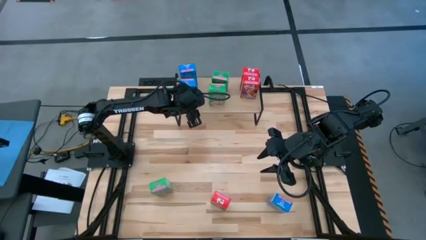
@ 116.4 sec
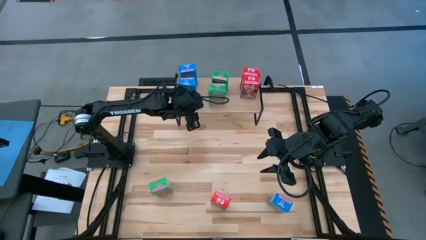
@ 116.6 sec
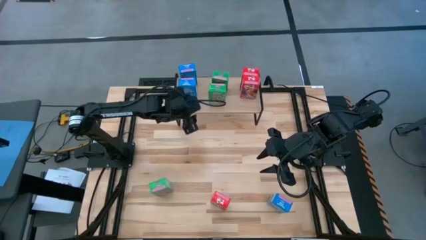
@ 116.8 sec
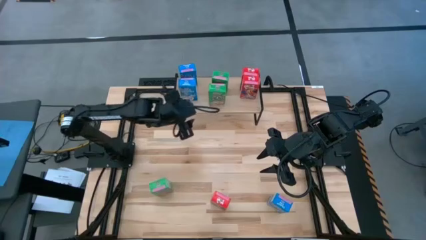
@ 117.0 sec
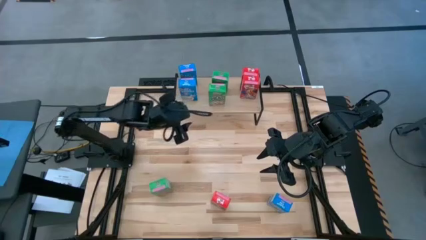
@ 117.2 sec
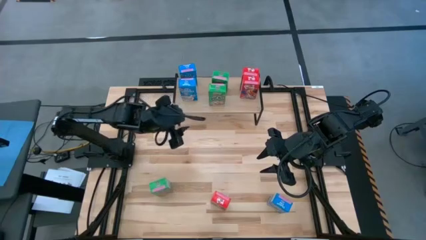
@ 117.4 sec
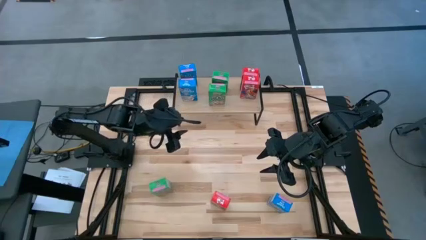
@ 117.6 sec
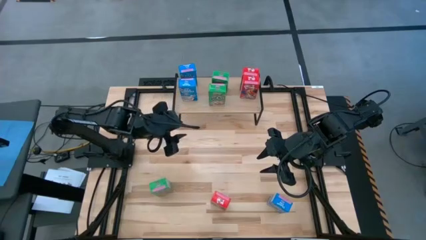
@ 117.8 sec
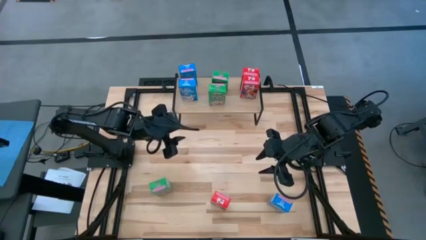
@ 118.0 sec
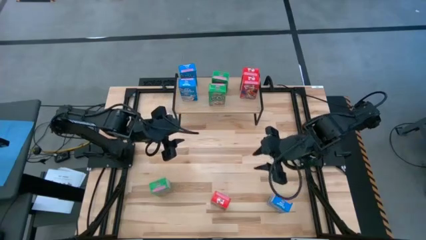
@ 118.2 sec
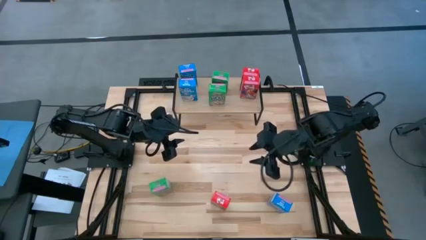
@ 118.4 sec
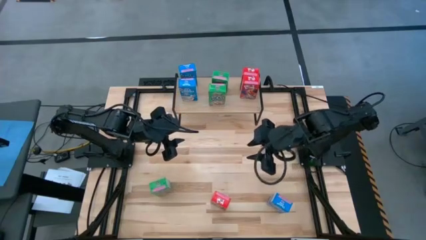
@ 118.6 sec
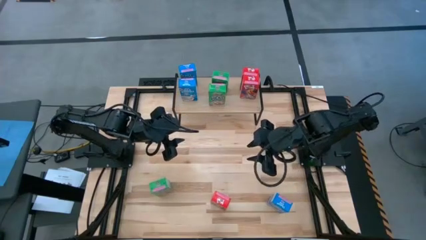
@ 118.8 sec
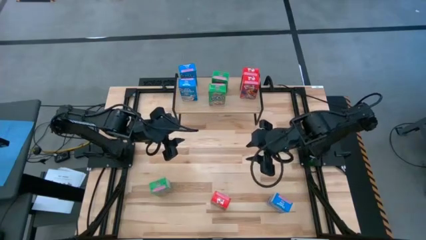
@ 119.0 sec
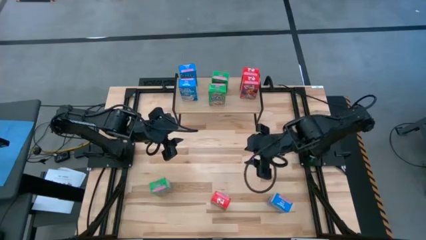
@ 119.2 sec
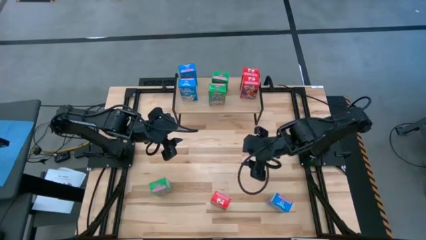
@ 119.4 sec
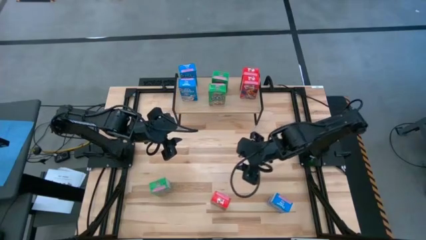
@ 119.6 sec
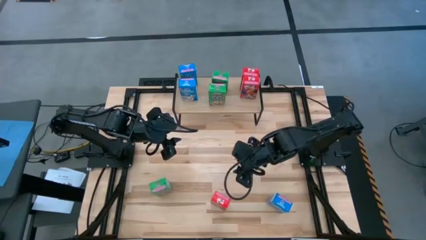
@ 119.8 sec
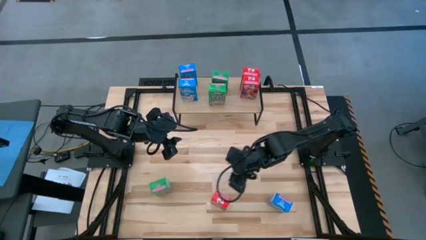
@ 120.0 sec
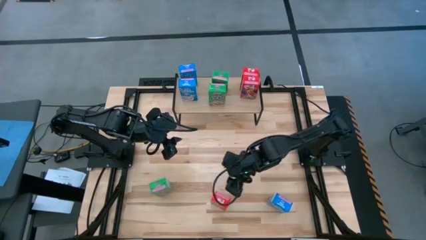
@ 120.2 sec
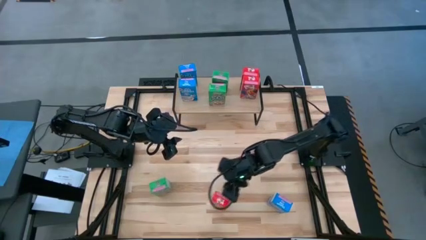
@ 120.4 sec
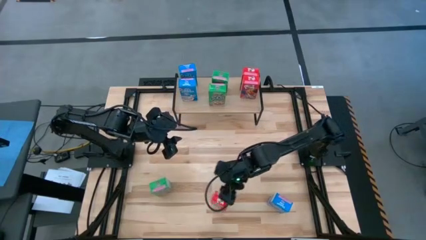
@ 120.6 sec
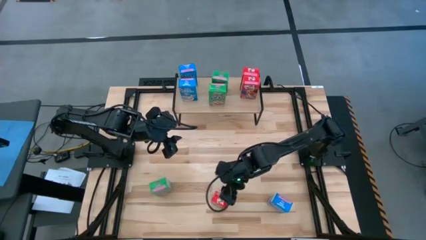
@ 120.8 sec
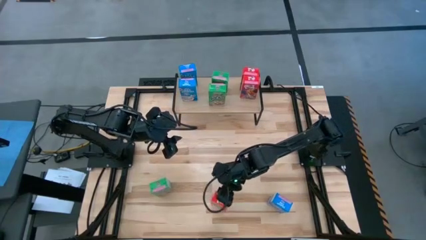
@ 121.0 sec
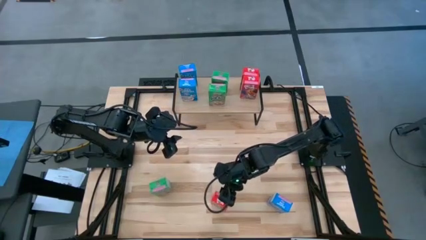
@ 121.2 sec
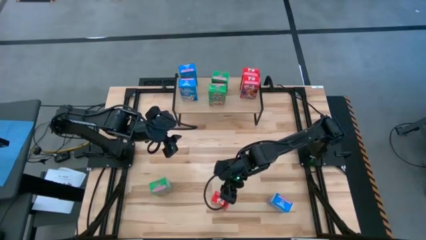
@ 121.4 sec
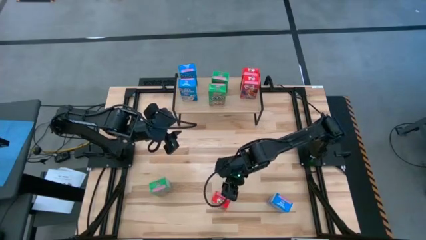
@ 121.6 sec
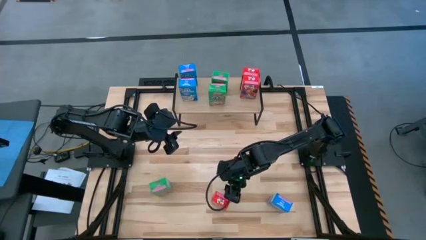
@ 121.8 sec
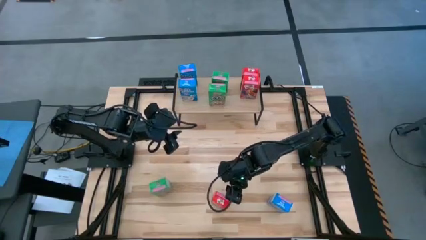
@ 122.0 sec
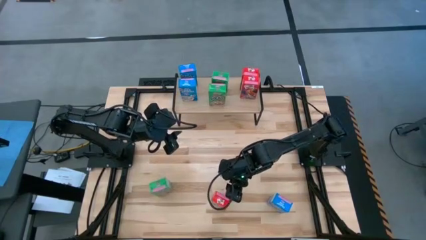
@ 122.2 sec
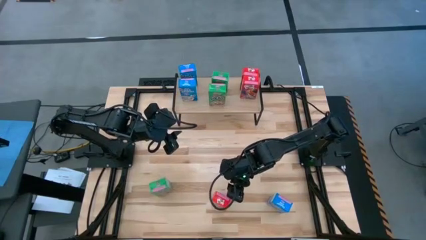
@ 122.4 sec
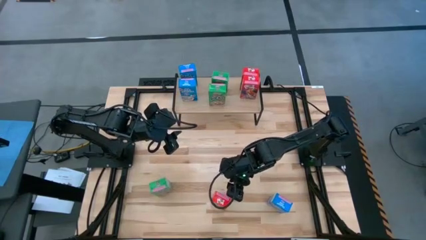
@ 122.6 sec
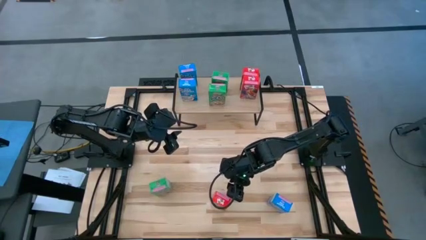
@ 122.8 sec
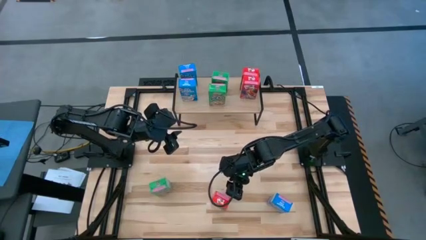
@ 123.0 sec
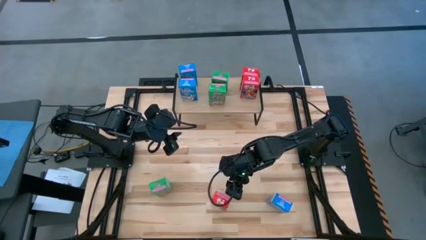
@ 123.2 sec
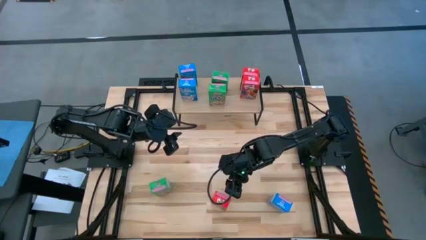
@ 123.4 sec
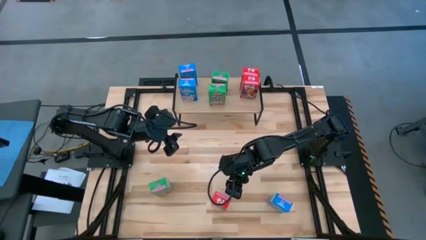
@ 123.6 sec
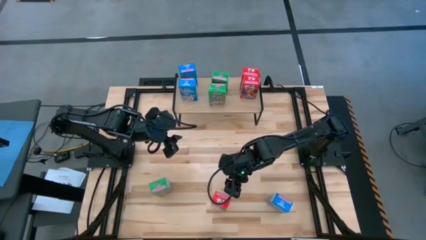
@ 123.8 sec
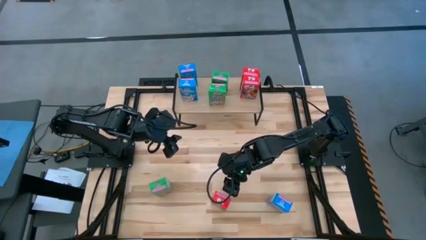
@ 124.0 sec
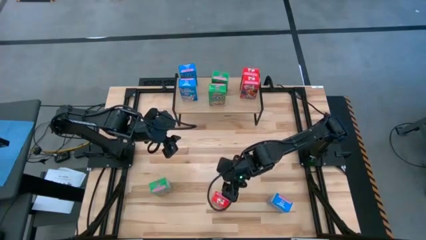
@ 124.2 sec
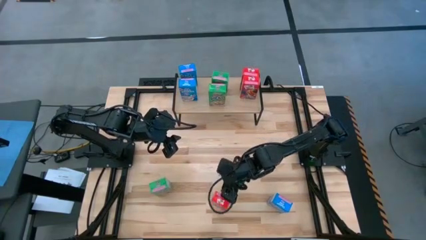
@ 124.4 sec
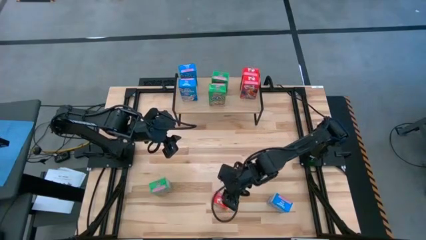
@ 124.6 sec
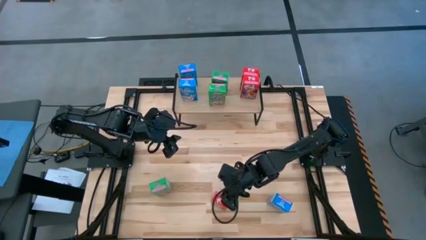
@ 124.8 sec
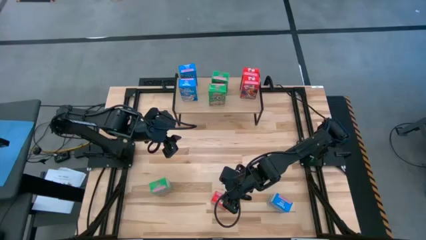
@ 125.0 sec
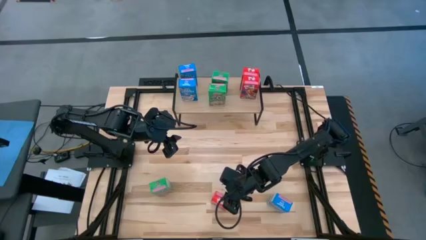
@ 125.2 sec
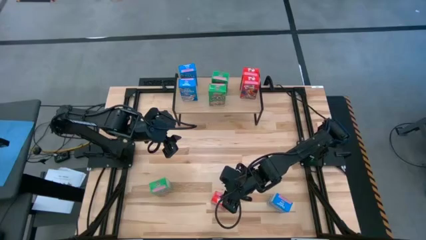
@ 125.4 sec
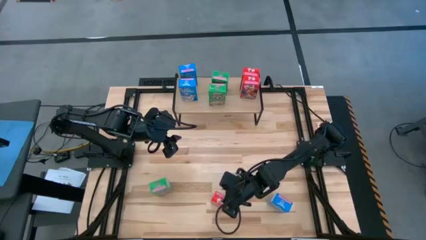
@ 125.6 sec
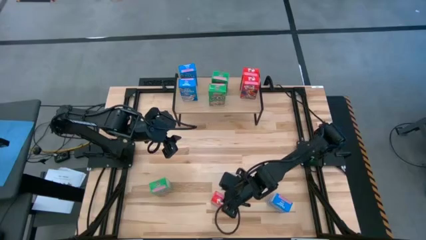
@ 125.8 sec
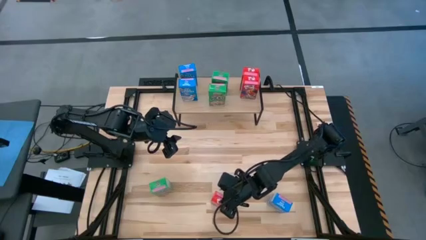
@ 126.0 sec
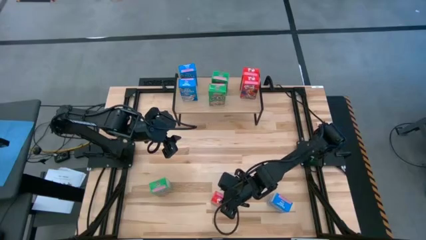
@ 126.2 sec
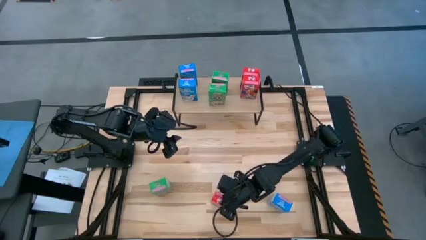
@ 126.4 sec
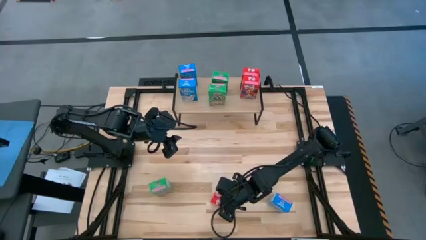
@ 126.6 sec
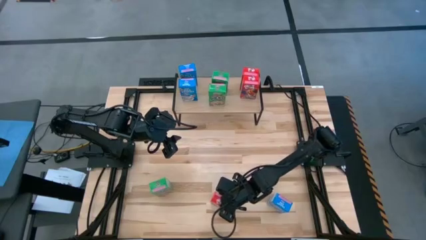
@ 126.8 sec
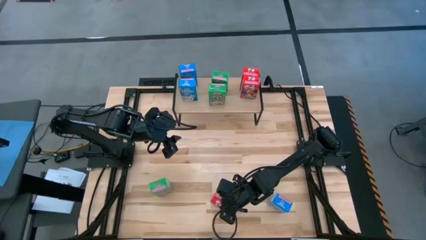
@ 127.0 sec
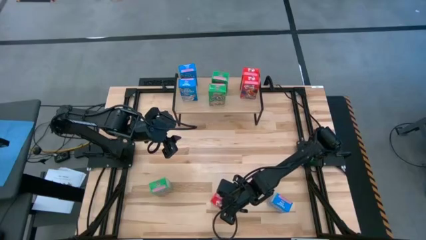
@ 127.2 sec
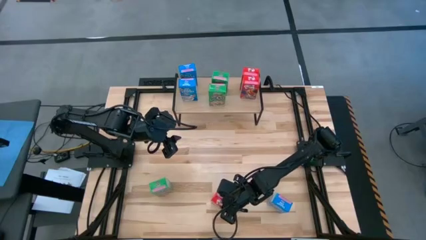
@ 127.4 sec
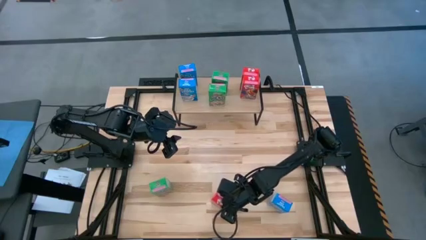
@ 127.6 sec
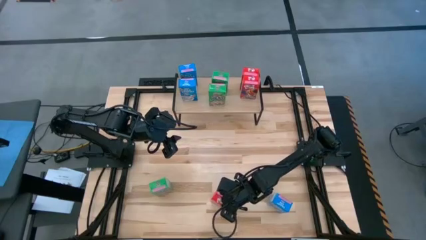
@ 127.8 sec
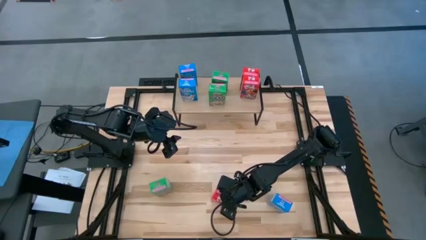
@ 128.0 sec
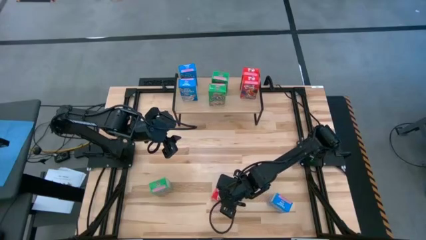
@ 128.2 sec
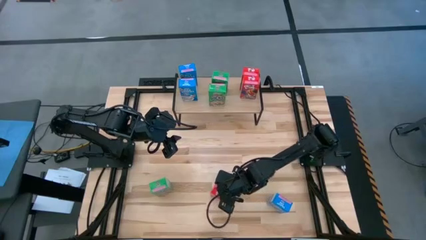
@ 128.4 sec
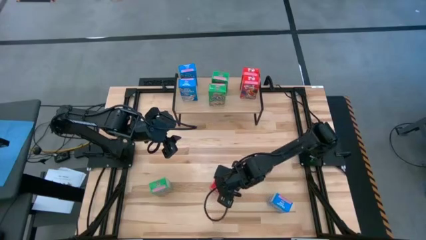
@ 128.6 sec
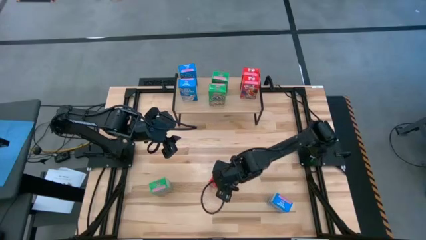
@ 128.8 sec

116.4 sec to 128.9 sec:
Task: Stack cereal on shelf
Put the red cereal box on the shelf aligned with the other red cereal boxes
